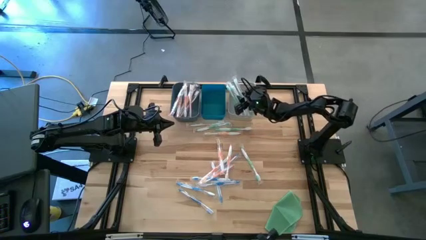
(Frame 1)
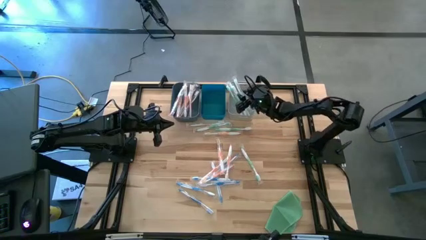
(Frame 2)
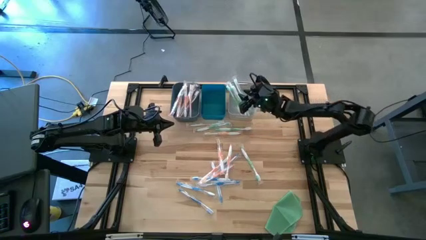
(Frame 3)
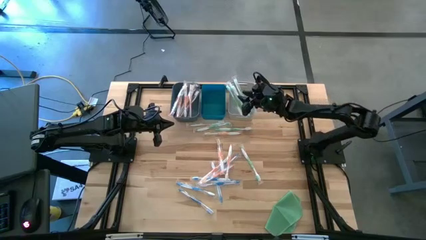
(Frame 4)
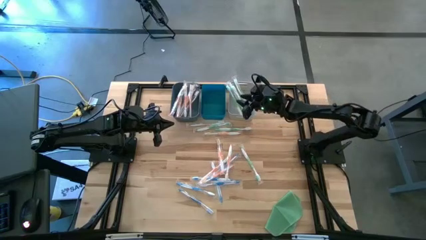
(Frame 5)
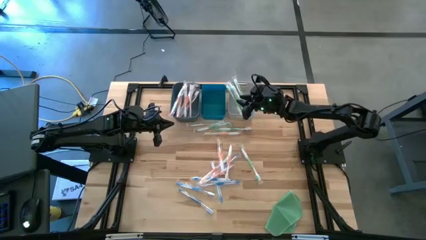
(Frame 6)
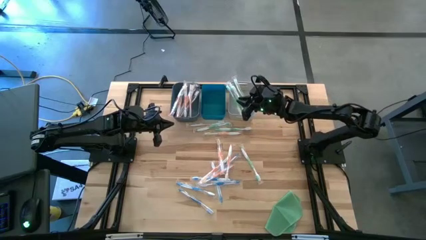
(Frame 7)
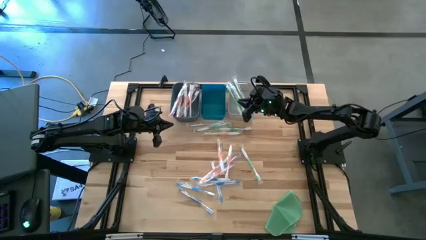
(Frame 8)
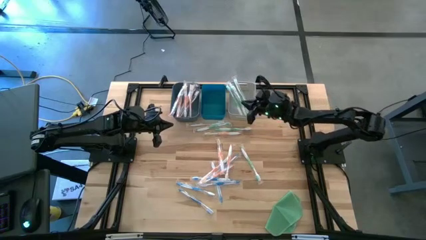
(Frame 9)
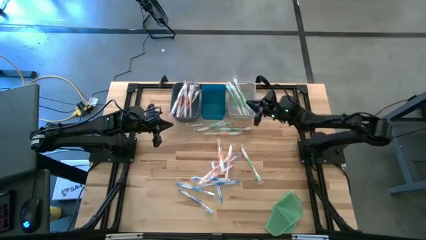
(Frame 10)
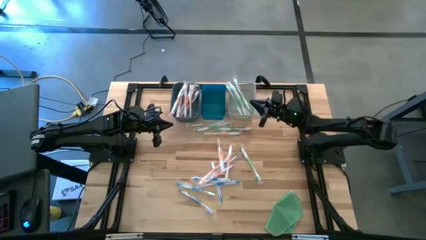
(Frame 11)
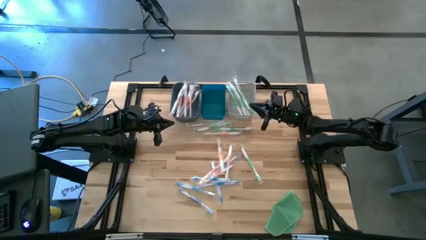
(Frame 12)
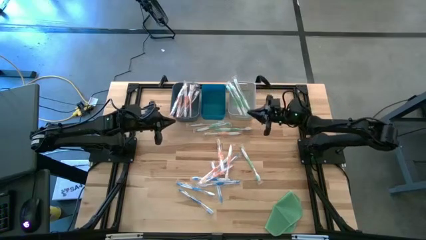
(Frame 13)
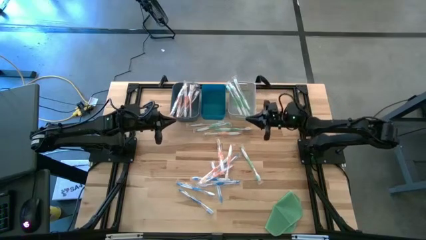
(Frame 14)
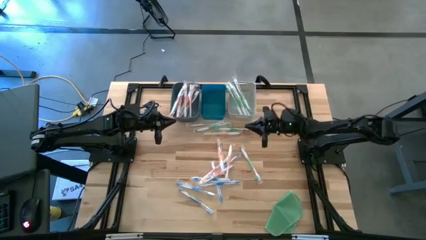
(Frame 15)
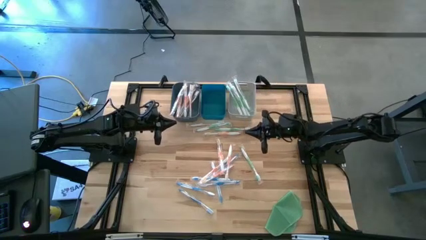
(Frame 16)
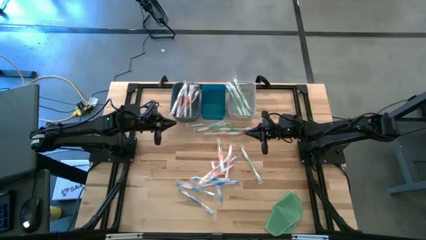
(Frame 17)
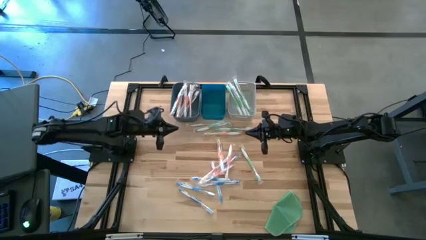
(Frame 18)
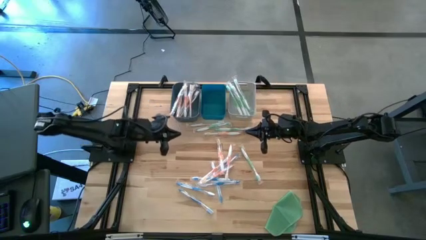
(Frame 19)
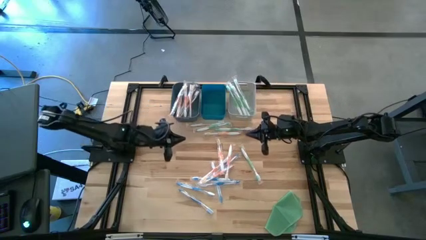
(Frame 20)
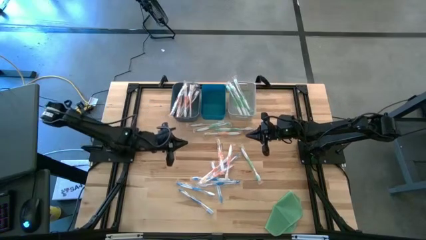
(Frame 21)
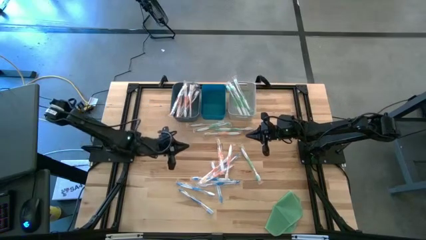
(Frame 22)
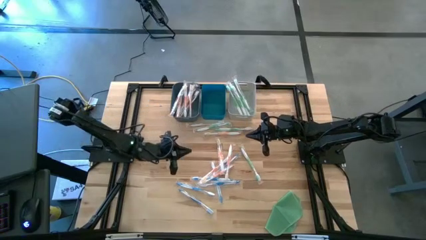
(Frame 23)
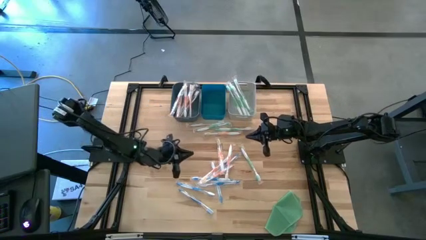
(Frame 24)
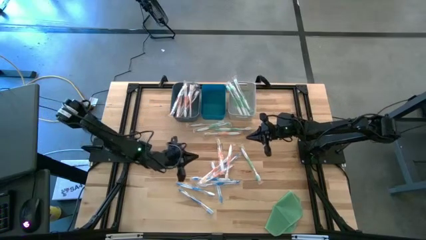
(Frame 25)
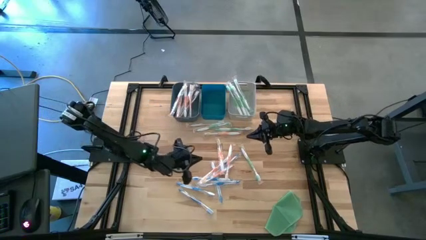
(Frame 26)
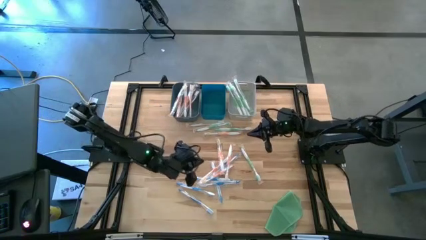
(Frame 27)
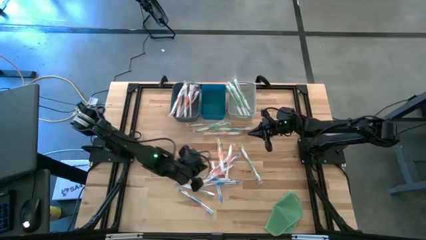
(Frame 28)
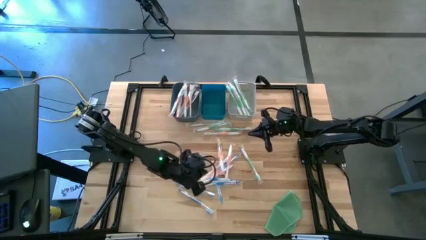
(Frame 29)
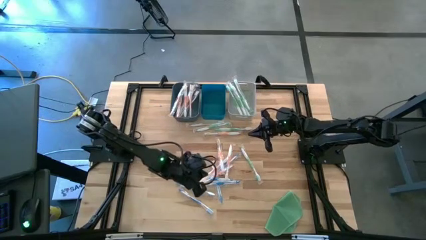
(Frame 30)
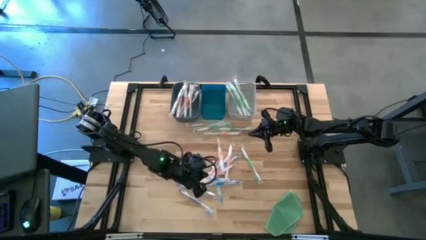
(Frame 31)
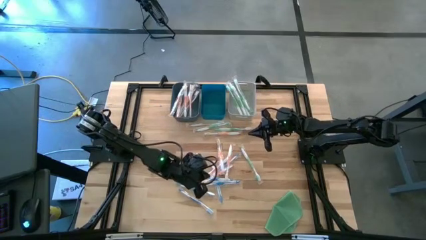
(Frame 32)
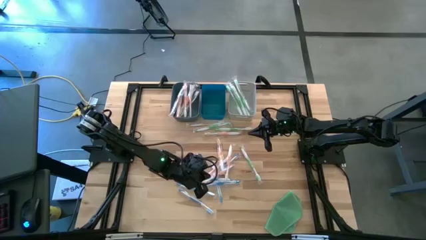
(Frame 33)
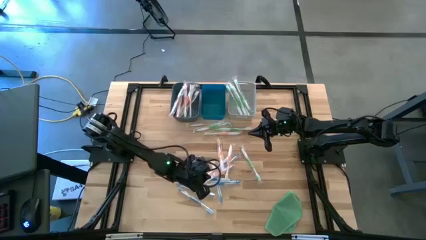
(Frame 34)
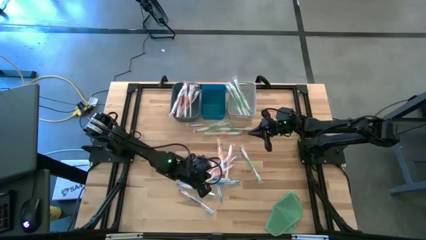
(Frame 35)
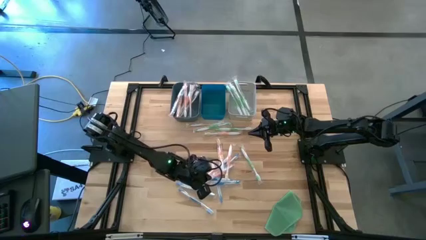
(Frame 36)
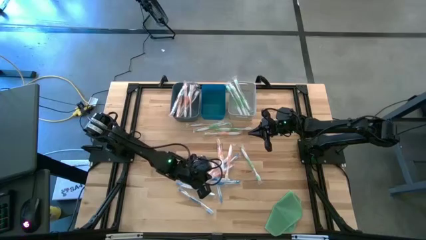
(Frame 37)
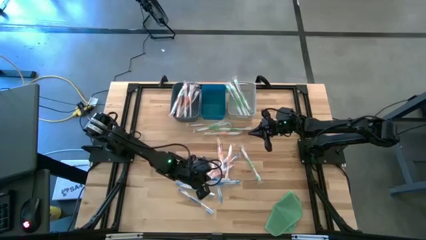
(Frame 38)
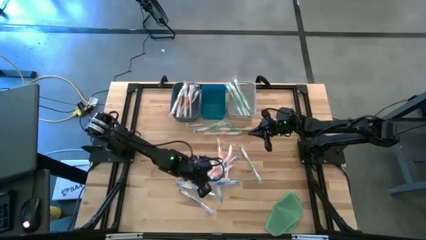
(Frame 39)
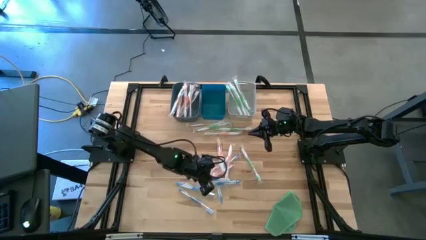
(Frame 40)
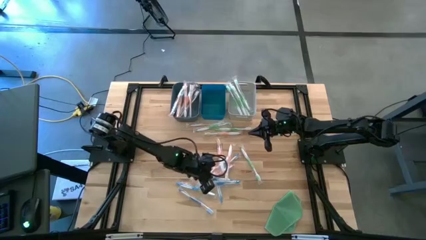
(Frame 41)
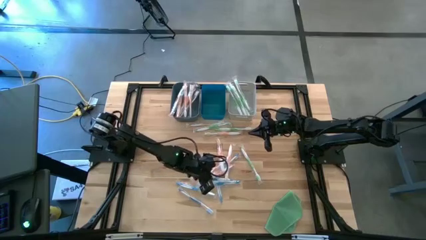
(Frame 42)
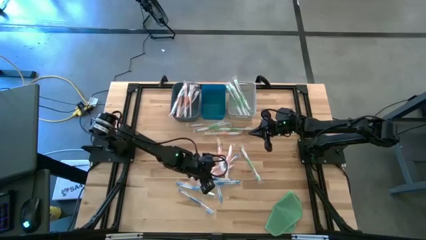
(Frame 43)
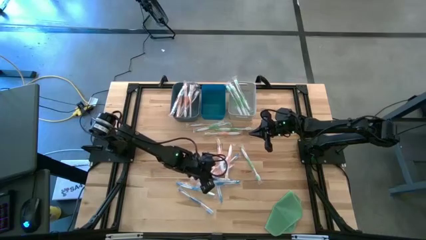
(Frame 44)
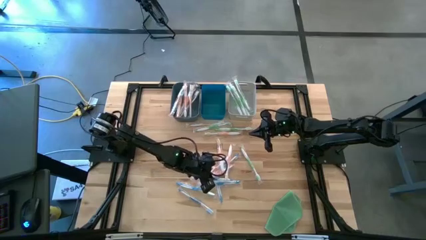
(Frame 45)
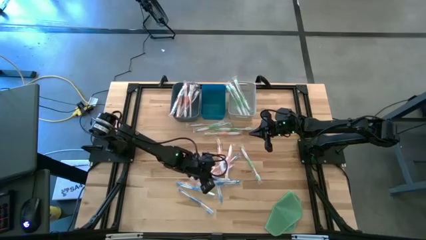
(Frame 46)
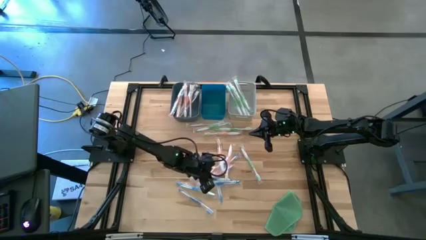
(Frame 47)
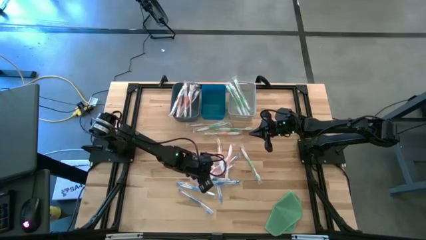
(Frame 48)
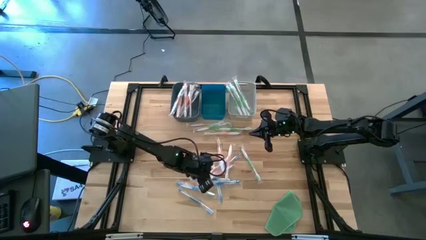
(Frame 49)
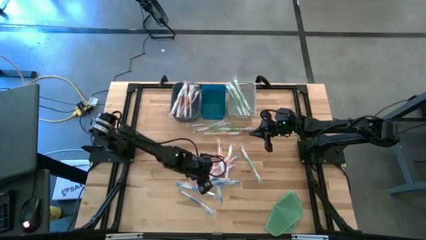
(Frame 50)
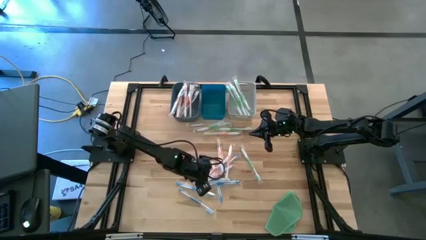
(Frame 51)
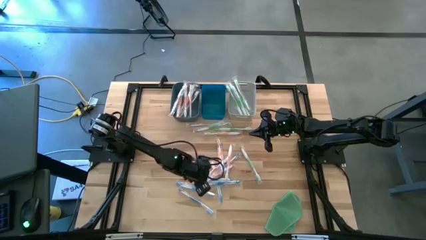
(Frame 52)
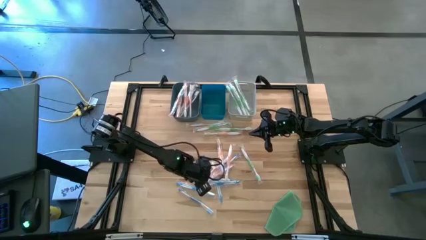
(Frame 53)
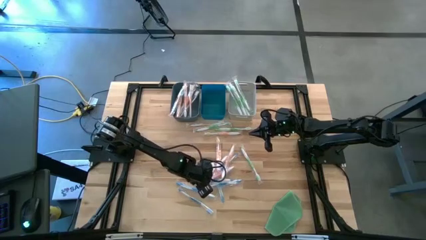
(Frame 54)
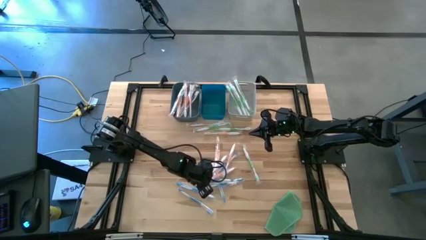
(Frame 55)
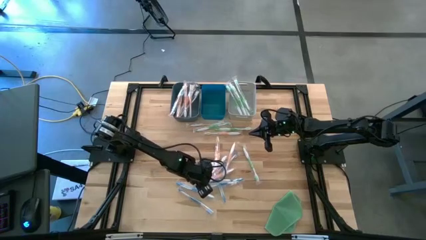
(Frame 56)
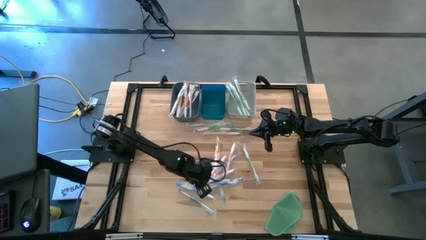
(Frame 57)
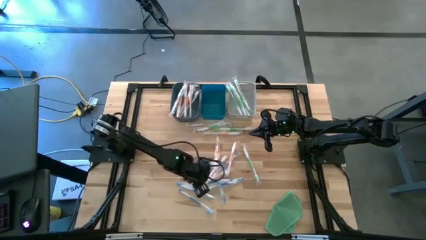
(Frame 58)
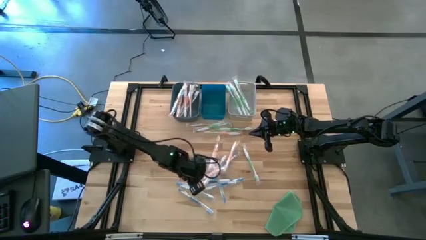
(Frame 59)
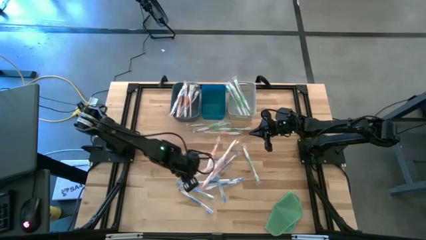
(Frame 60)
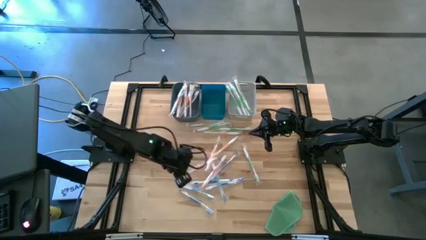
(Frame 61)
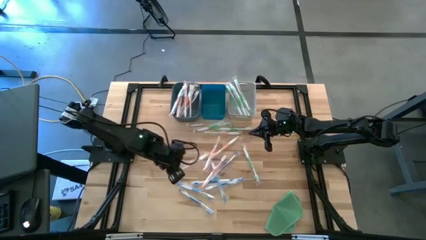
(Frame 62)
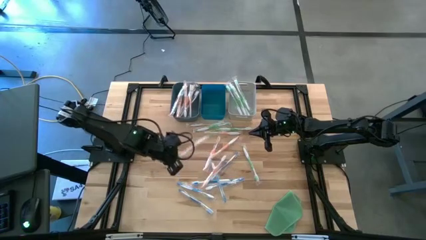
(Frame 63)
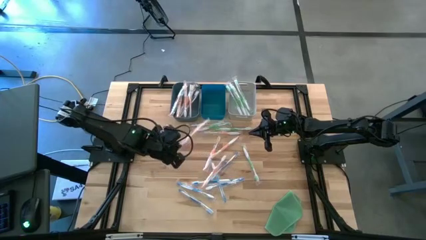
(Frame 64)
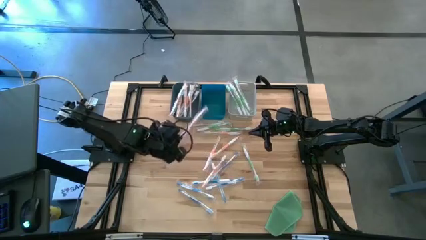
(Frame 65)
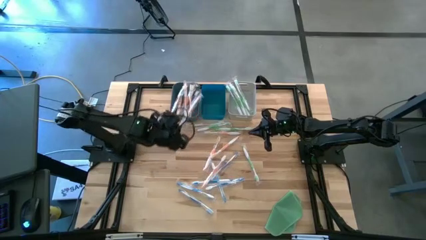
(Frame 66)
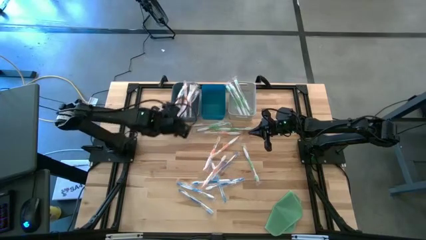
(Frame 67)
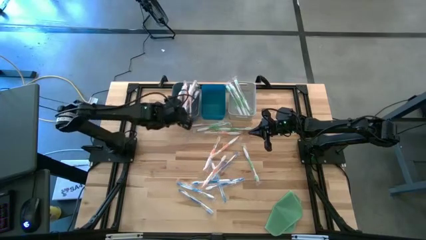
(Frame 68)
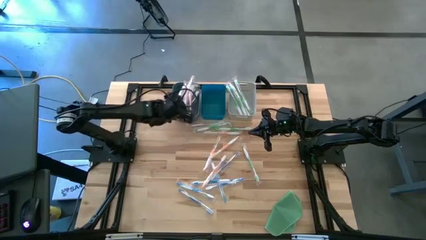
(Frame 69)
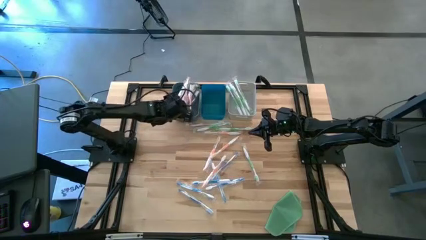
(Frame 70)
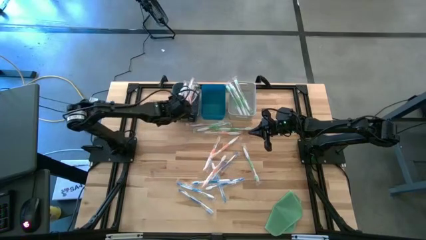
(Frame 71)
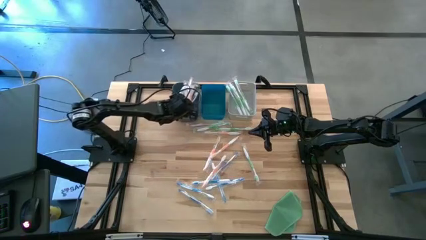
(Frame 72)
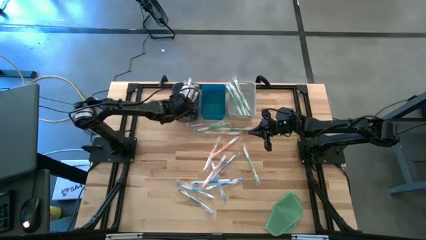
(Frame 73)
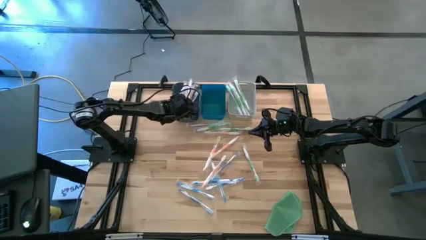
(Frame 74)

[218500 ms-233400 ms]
Task: Pick & Place Toothbrushes
Put the orange toothbrush into the dark blue bin

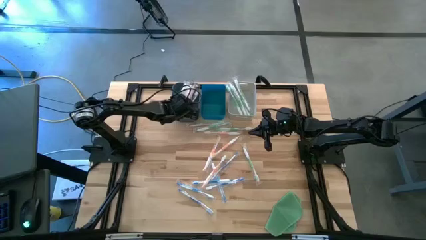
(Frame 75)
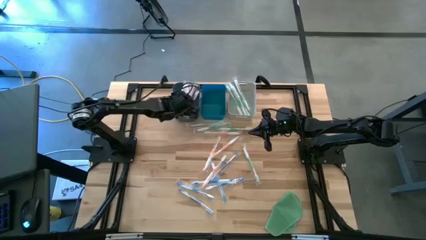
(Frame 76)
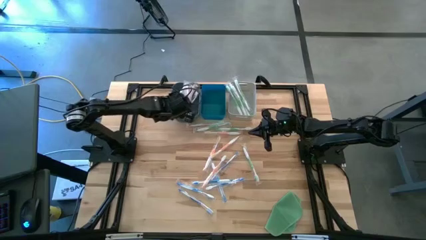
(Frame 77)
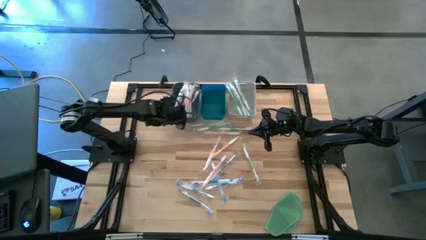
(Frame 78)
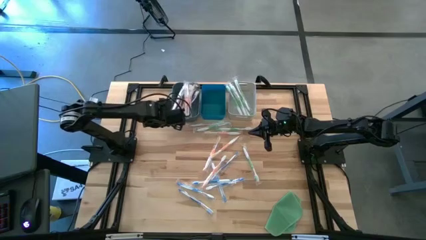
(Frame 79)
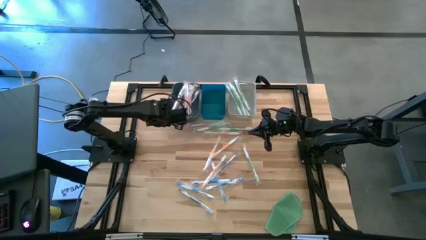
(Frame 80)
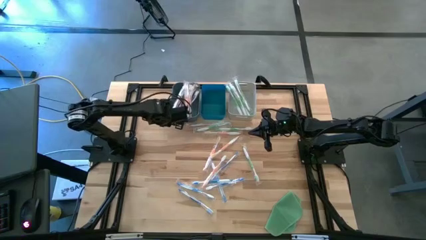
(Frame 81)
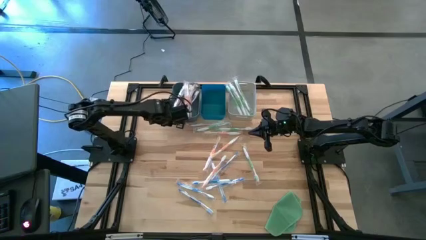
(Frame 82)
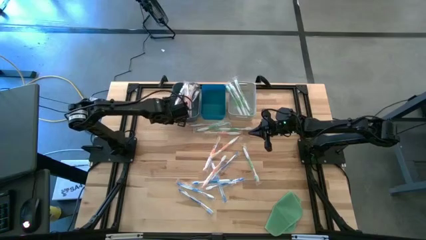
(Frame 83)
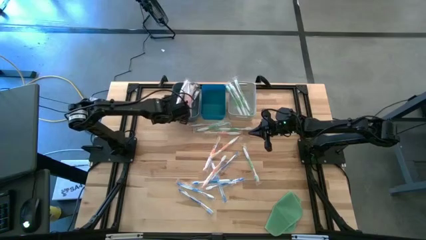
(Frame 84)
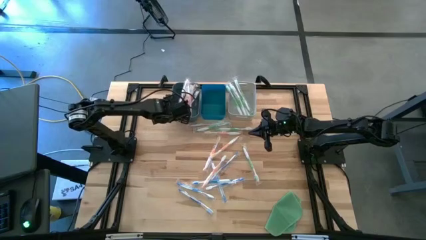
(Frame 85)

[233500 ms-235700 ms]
Adjust the orange toothbrush in the dark blue bin
